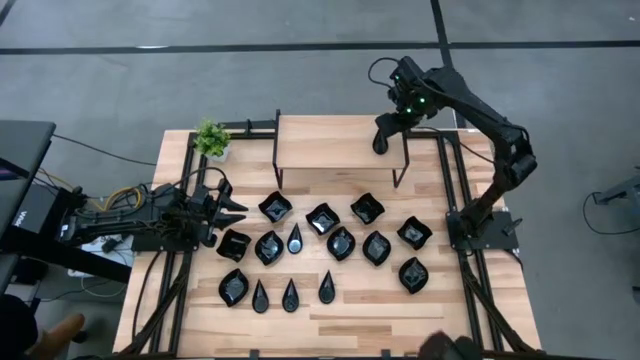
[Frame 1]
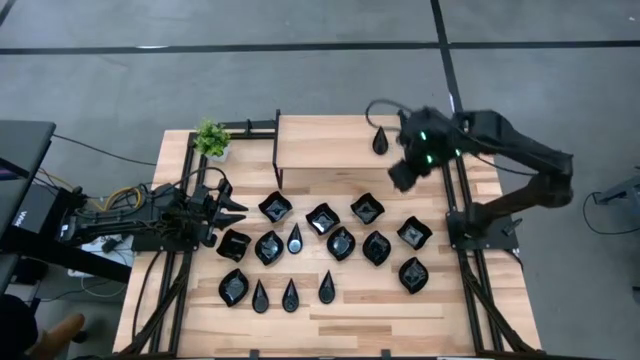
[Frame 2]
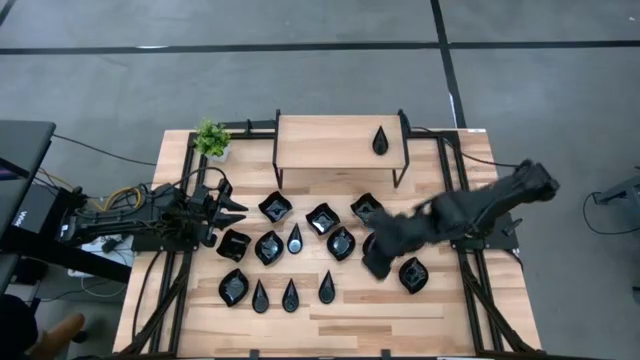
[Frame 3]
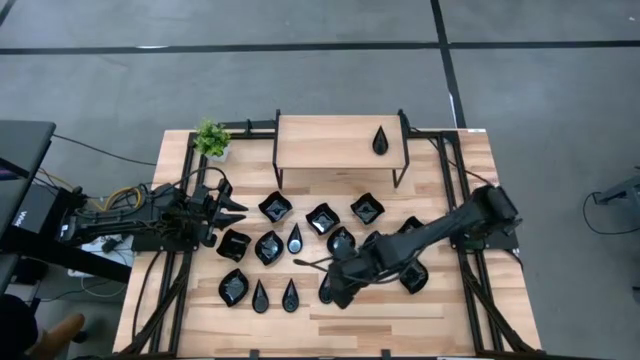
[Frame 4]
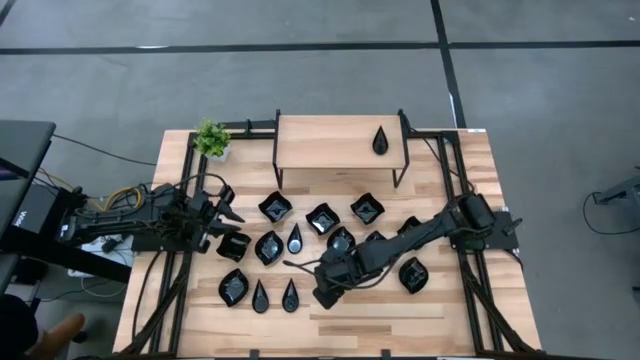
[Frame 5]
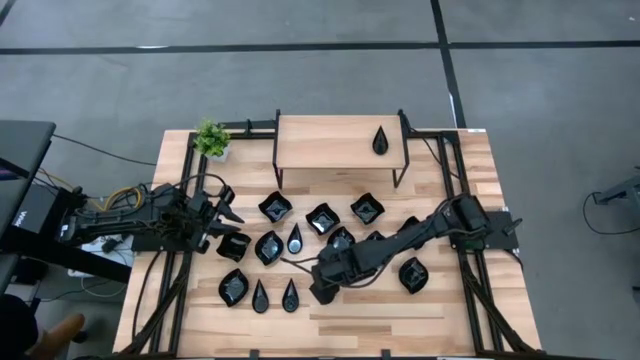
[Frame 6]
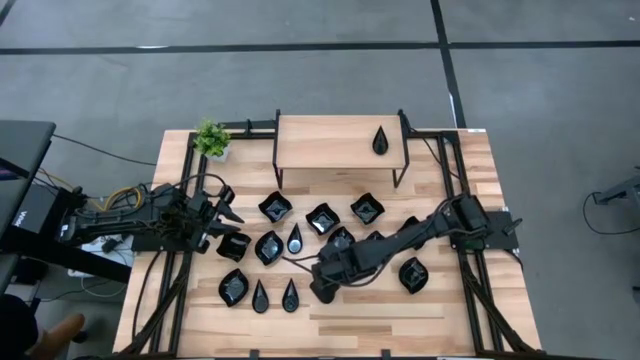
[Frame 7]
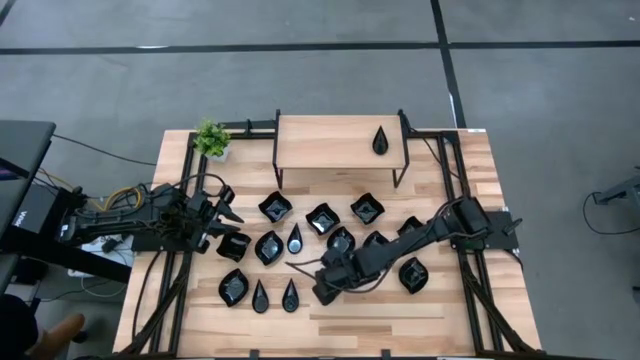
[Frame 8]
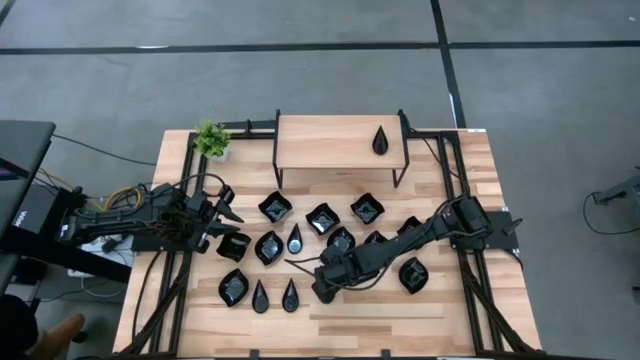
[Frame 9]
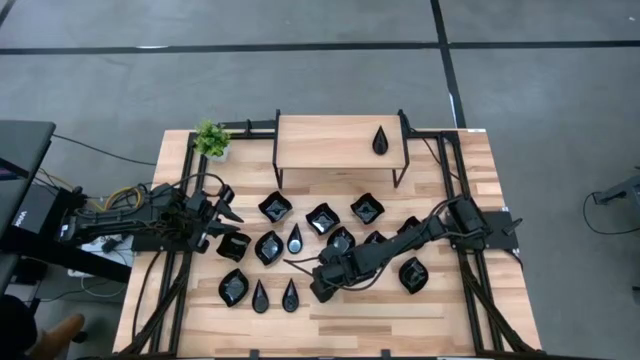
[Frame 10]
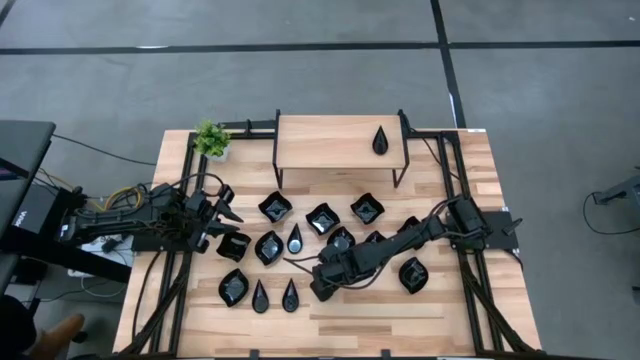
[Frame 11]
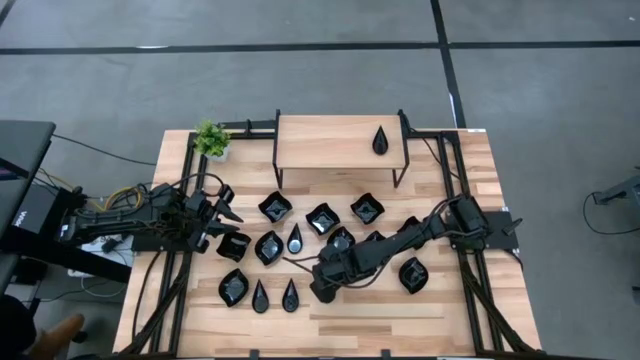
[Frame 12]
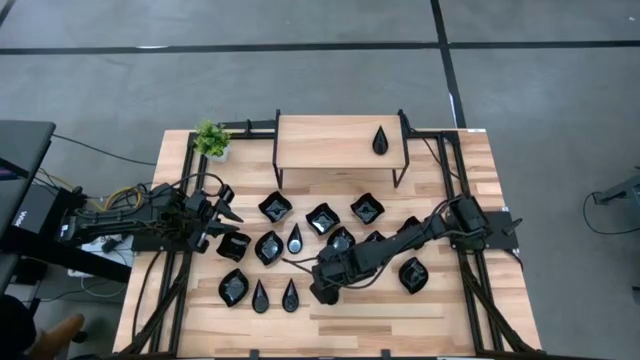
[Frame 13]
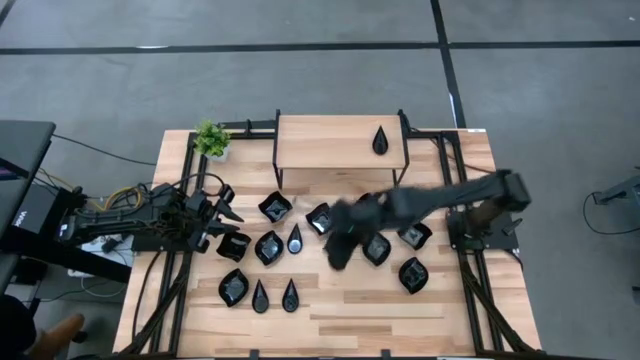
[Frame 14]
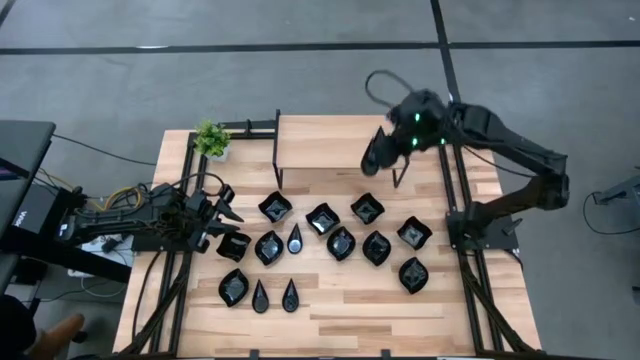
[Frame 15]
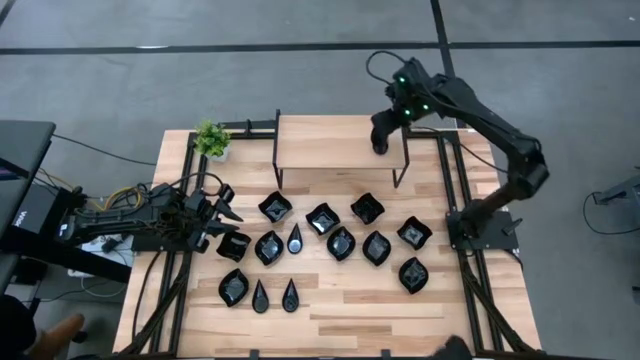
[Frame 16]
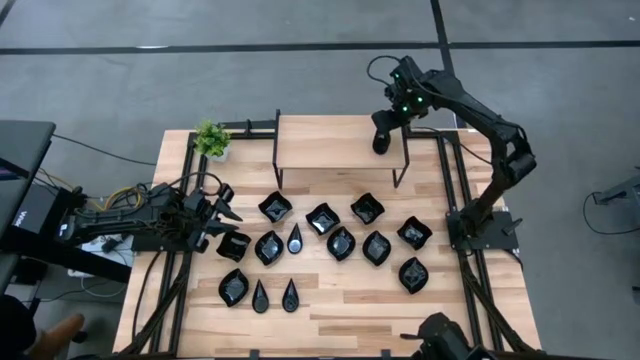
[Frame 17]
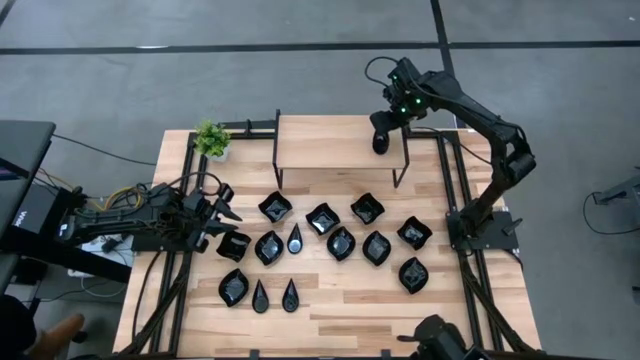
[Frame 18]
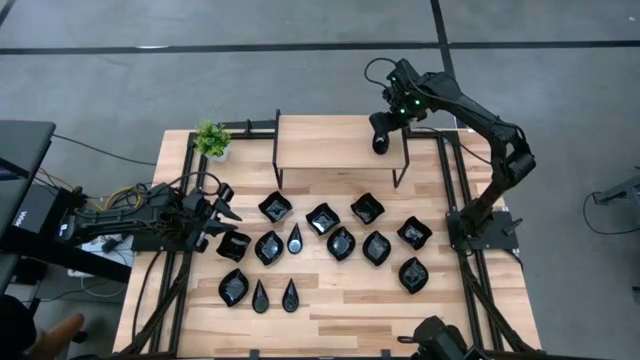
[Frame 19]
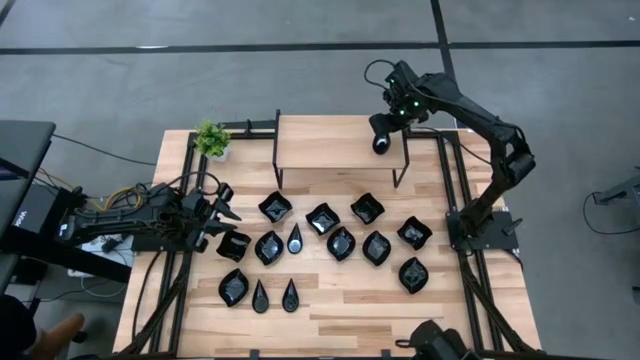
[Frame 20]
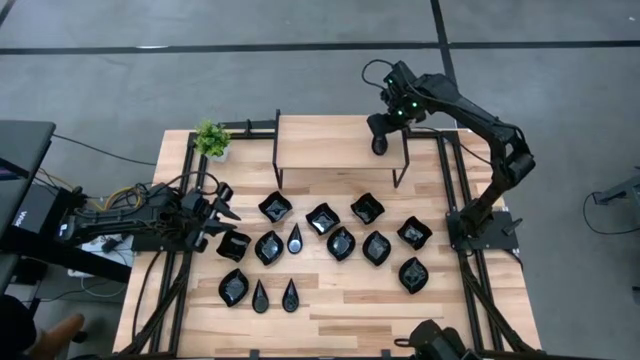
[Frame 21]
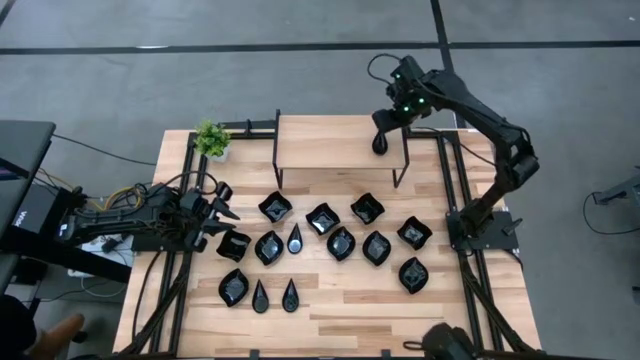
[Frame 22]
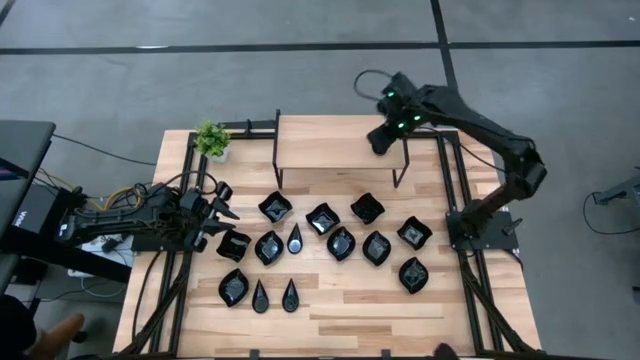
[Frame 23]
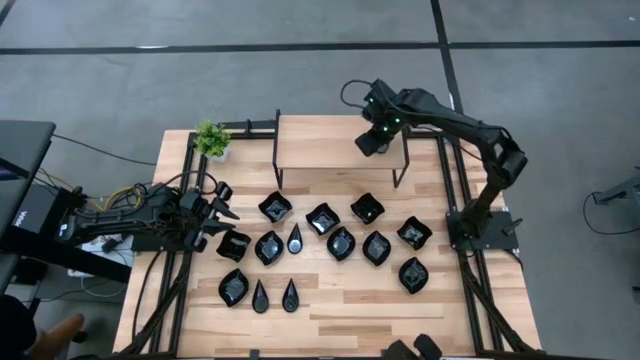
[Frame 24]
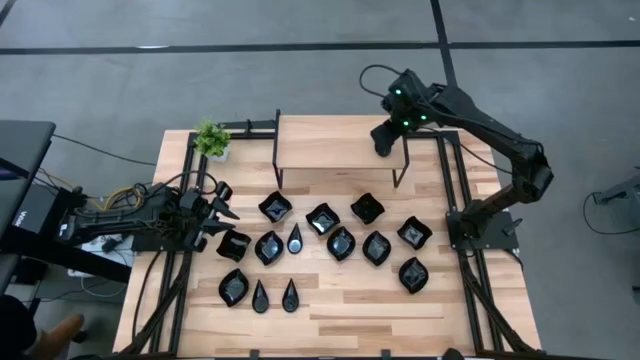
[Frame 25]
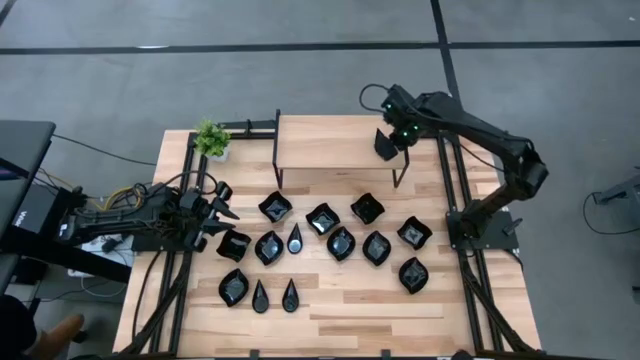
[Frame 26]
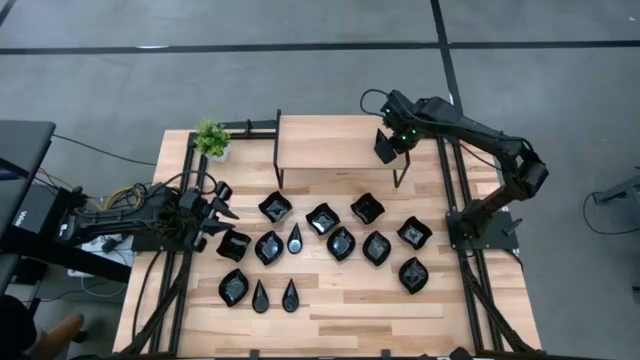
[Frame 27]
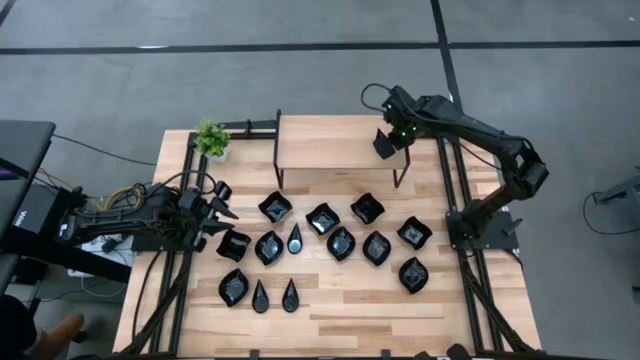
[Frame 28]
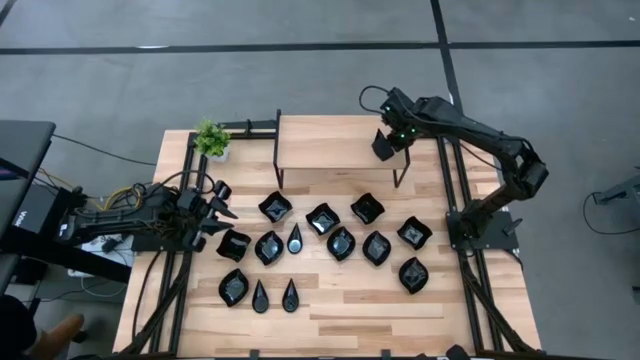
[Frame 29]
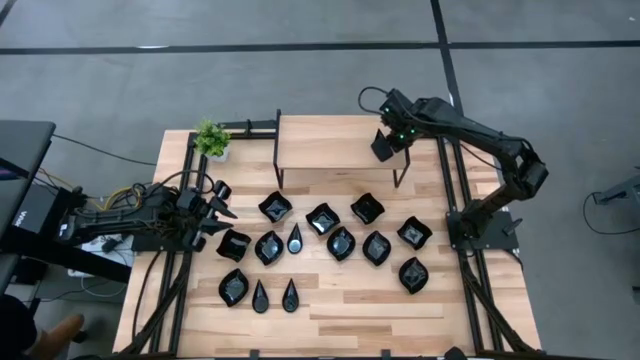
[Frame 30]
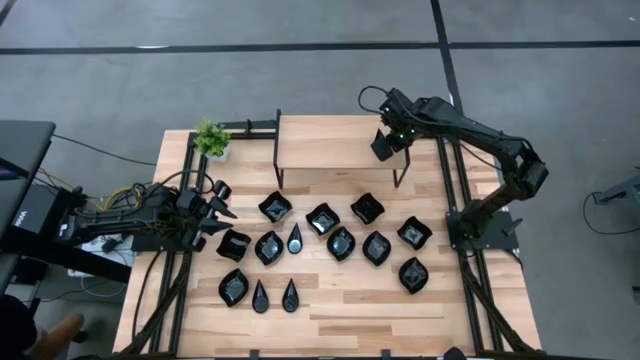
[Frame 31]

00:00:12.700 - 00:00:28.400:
Task: Pick & Place Mini shaped plates
Stack the black plate on top of the black plate on the shelf

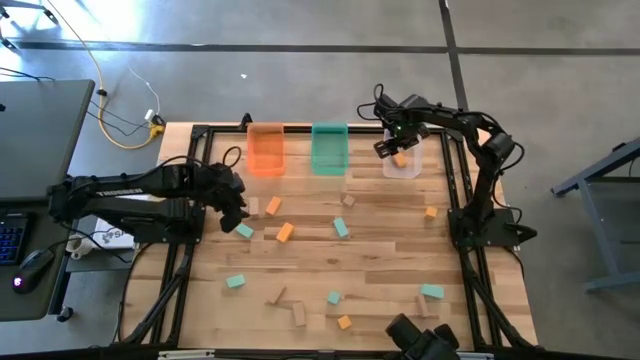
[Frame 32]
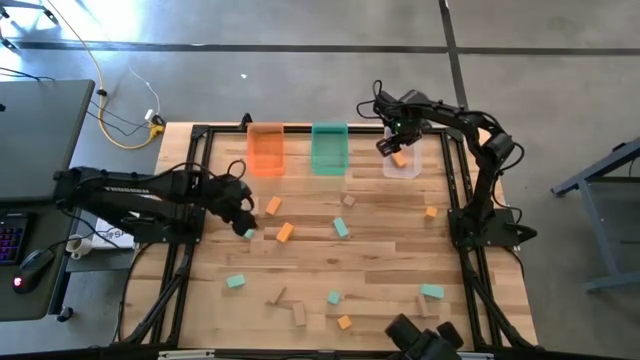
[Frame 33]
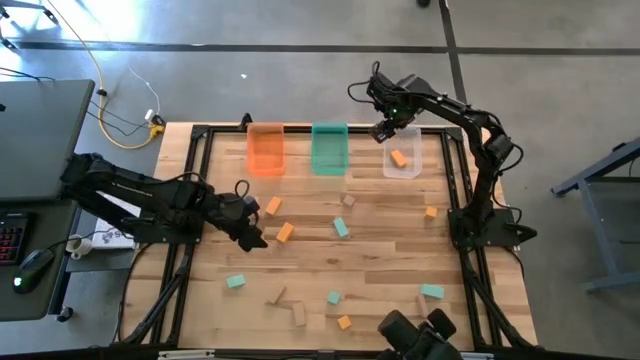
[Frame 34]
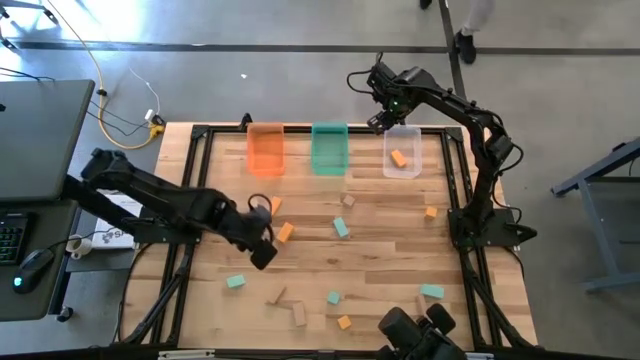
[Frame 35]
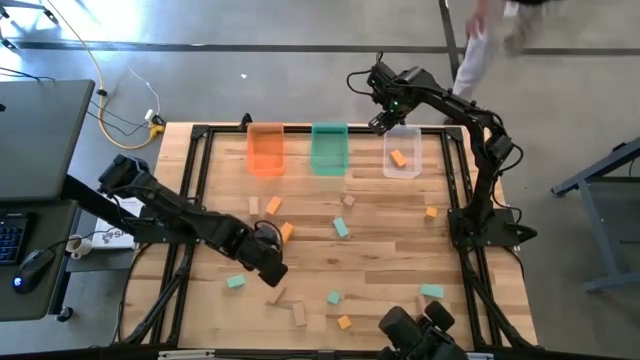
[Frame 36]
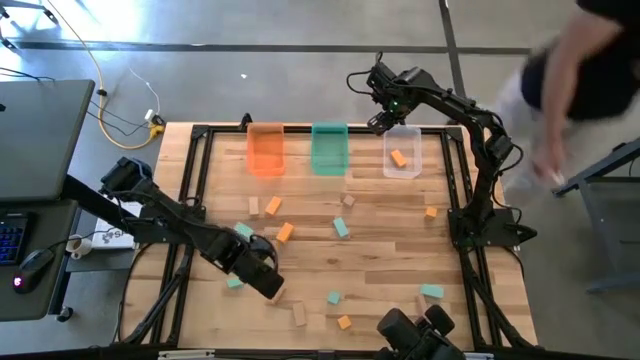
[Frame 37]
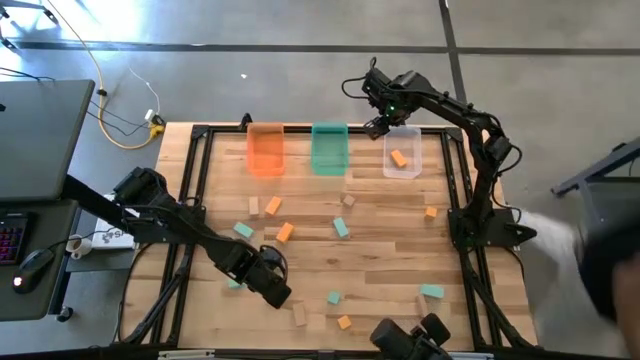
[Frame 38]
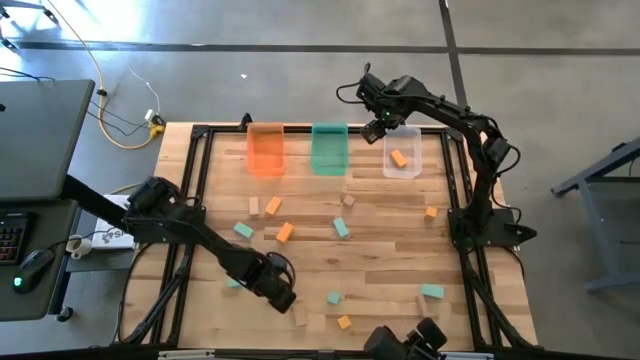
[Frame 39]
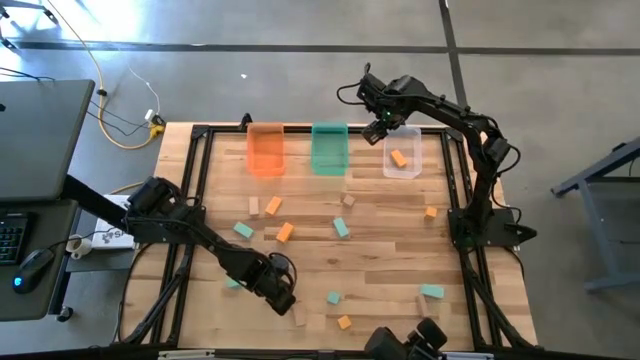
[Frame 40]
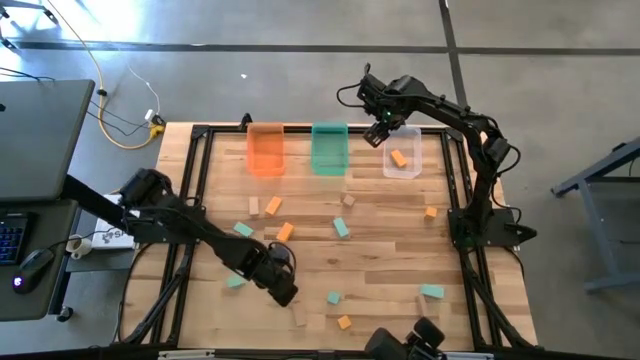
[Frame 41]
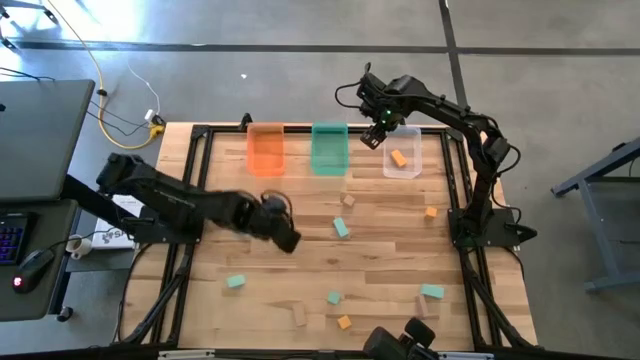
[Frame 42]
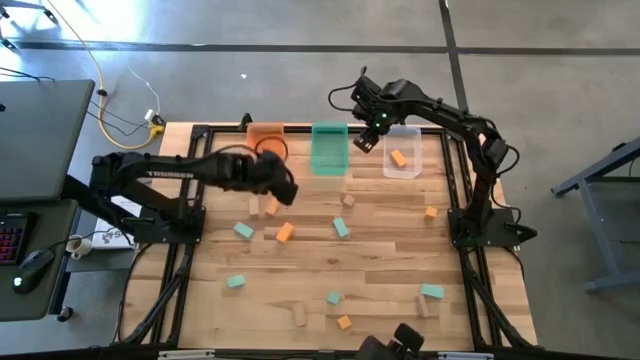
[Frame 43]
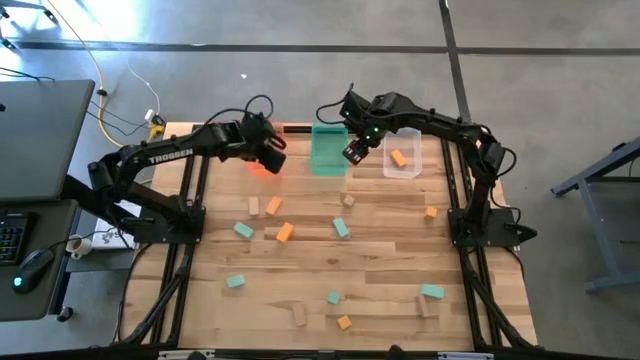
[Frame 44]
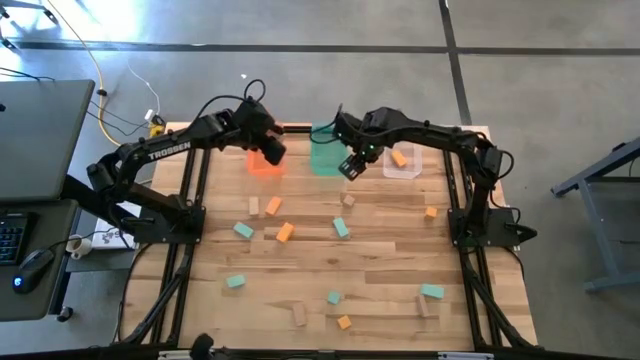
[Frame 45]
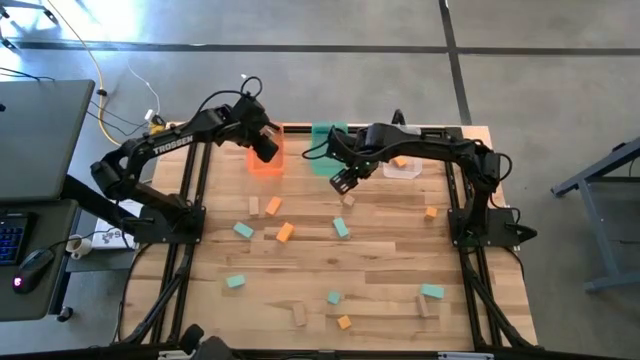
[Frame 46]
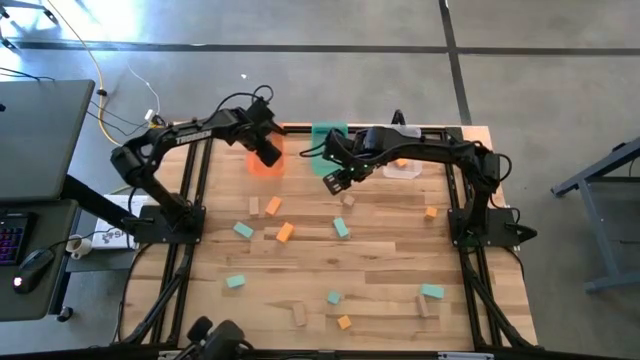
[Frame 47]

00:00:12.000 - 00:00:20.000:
Task: Sort & place blocks by color
Put the brown block into the orange bin
